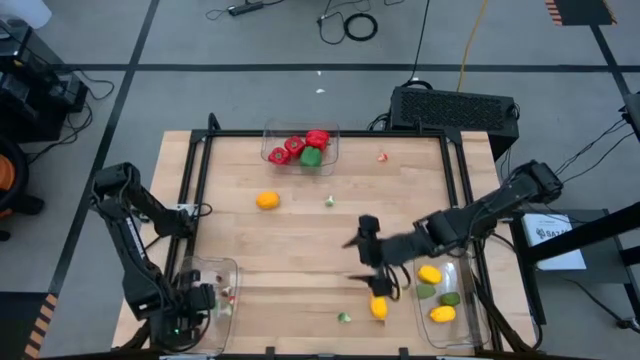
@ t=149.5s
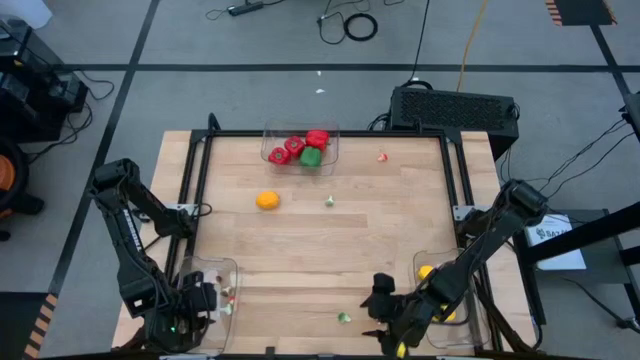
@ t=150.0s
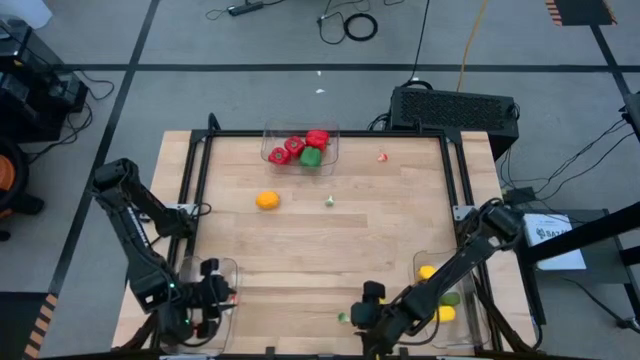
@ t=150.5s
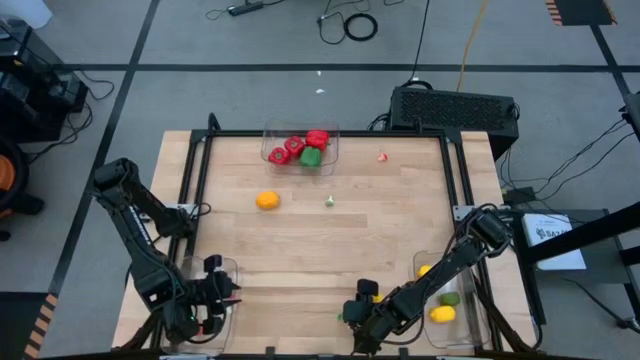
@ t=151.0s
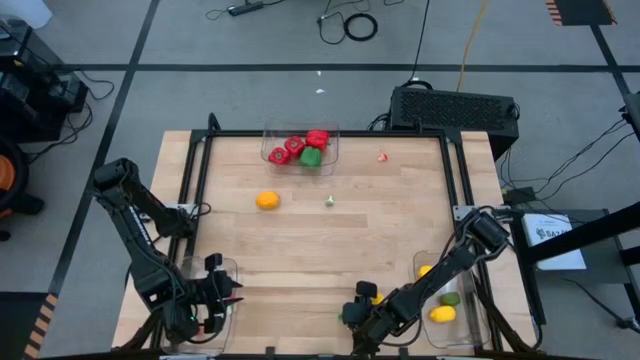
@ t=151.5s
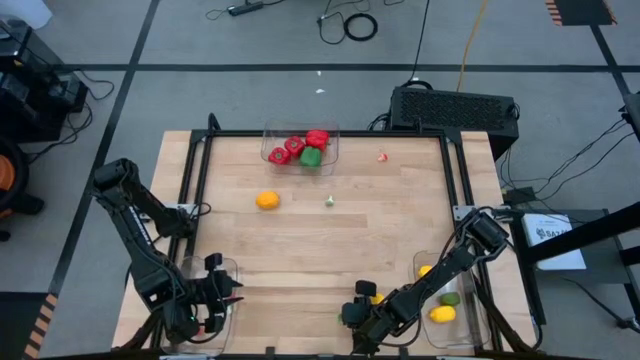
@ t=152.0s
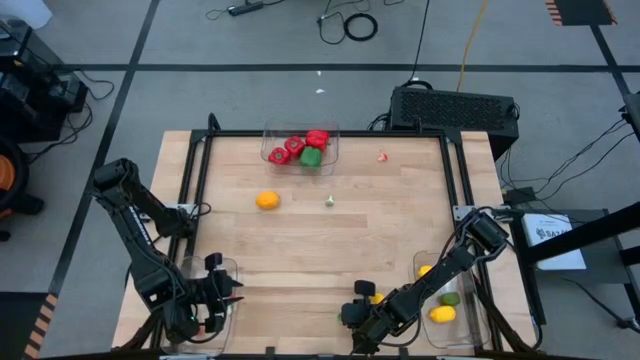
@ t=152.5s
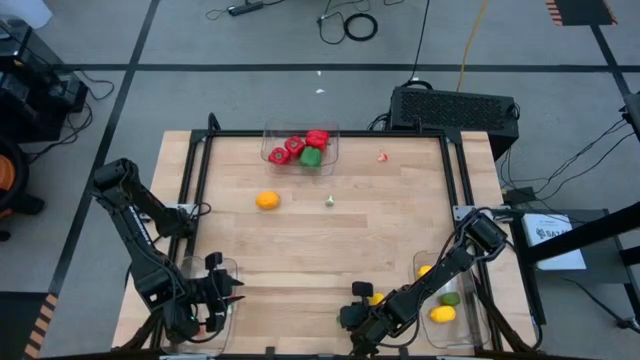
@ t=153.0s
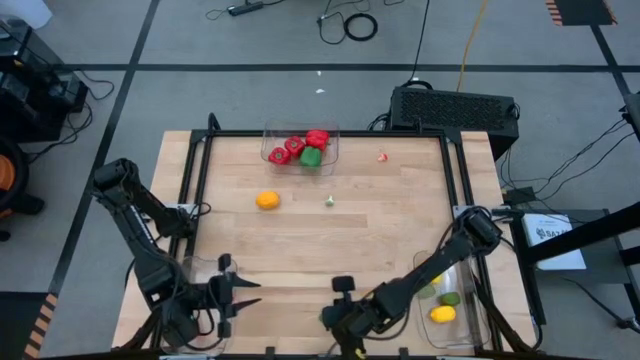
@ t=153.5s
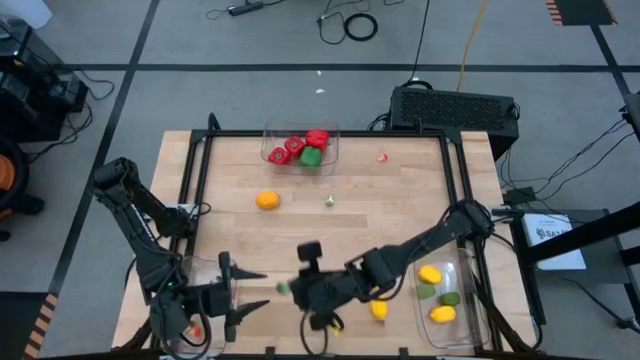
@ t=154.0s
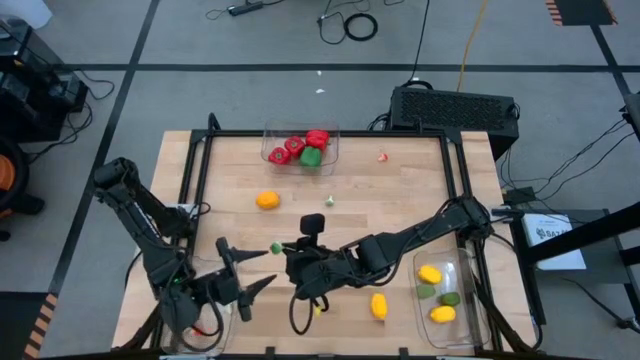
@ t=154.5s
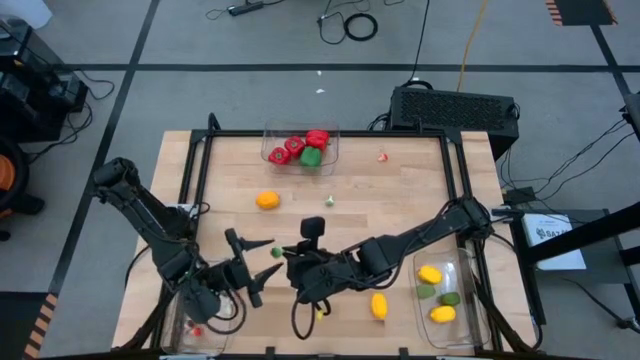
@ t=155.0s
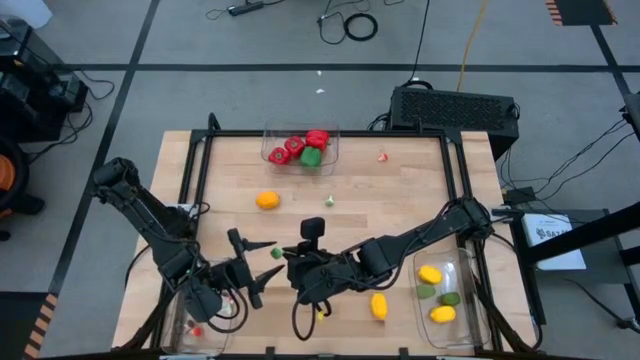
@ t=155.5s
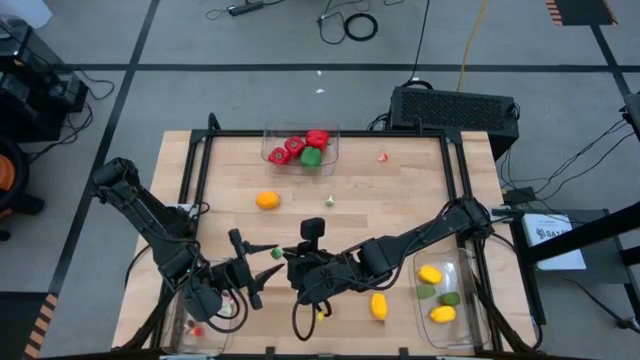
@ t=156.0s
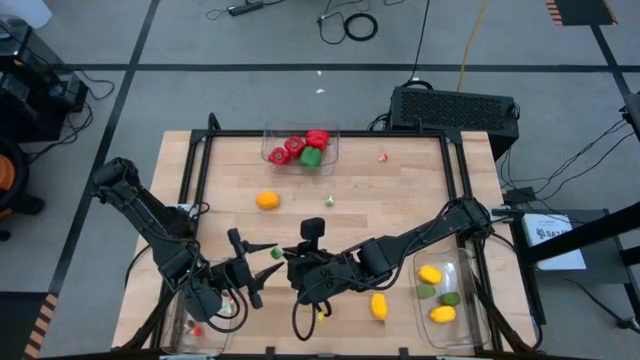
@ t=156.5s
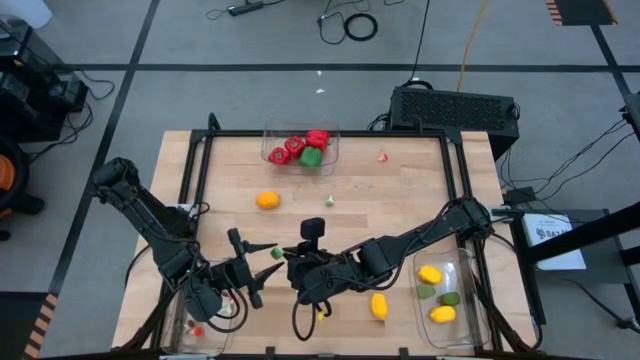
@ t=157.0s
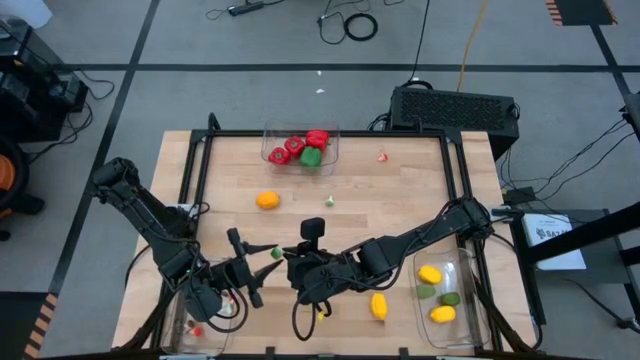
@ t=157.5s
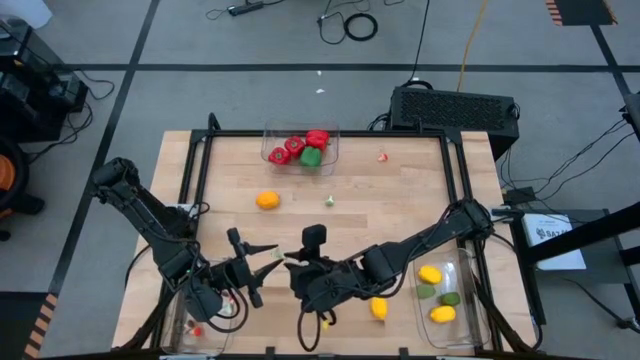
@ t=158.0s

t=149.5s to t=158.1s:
Task: Sort produce into baskets
Put the green mushroom into the bottom left transparent bin

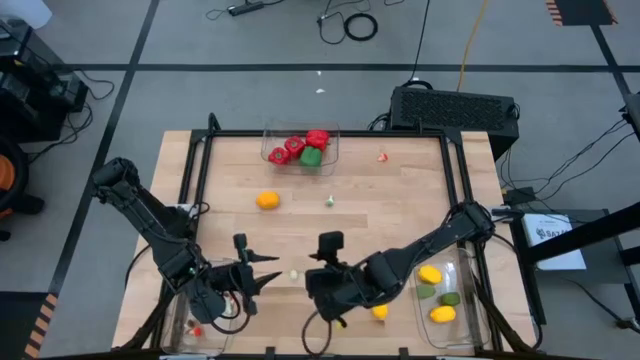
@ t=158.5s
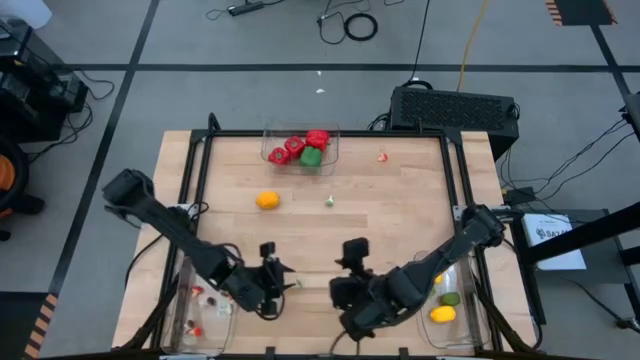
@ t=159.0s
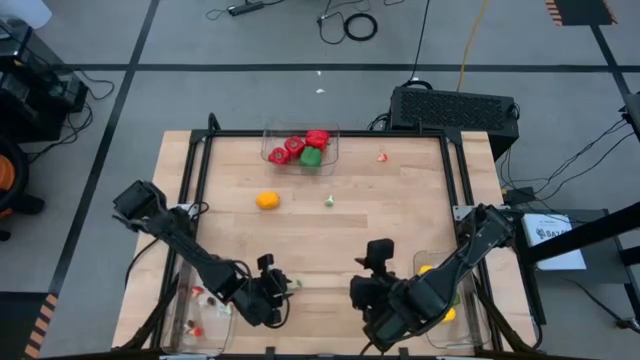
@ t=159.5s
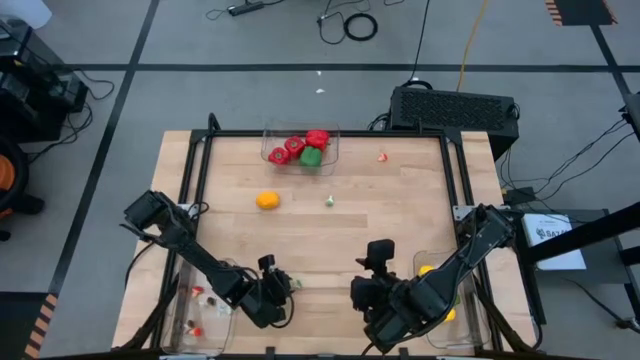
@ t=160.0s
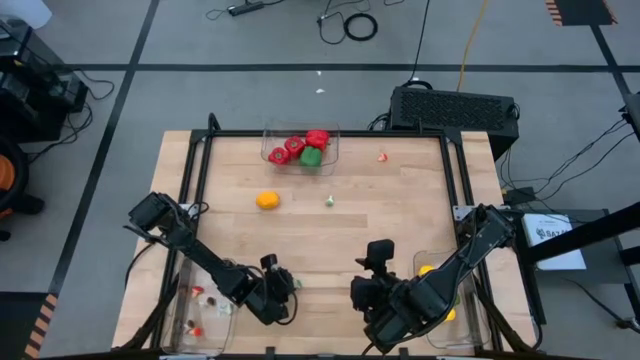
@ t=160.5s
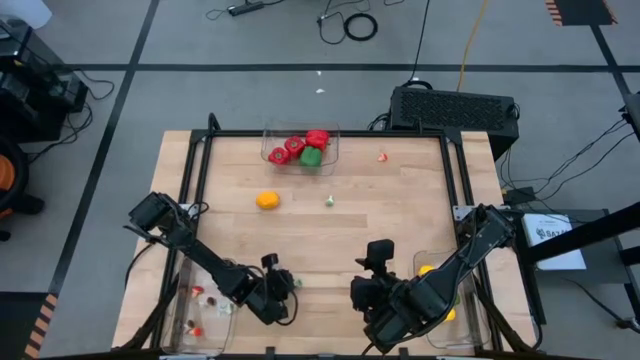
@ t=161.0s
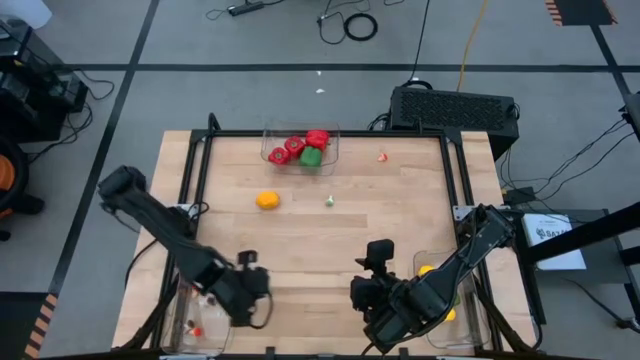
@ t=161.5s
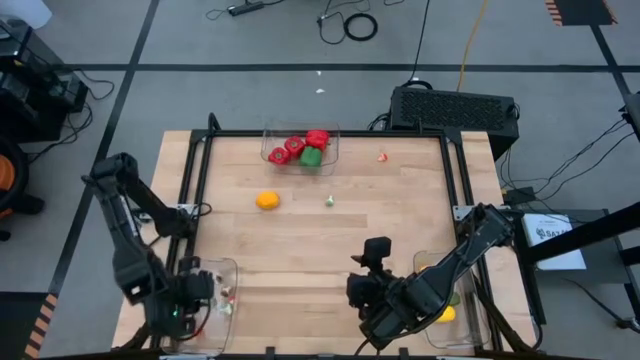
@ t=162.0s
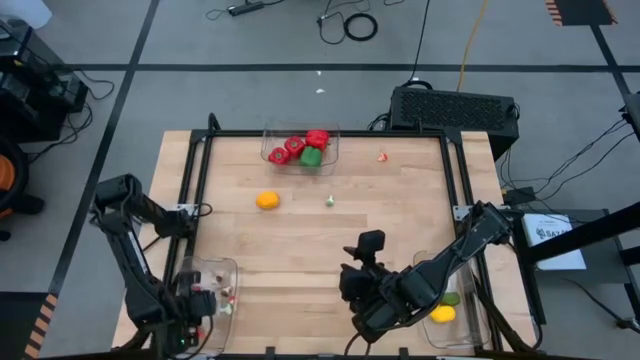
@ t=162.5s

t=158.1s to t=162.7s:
Put the green mushroom into the bottom left transparent bin

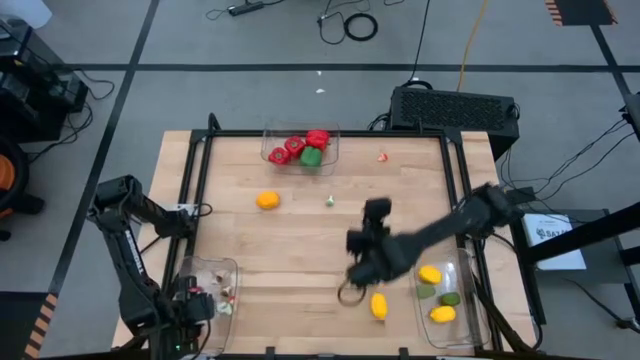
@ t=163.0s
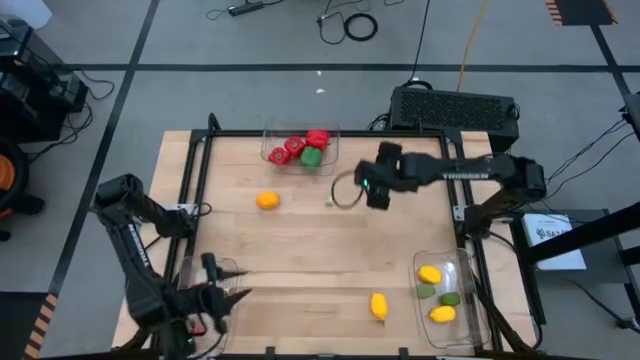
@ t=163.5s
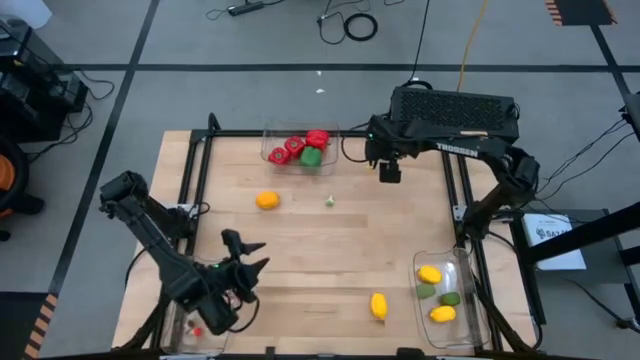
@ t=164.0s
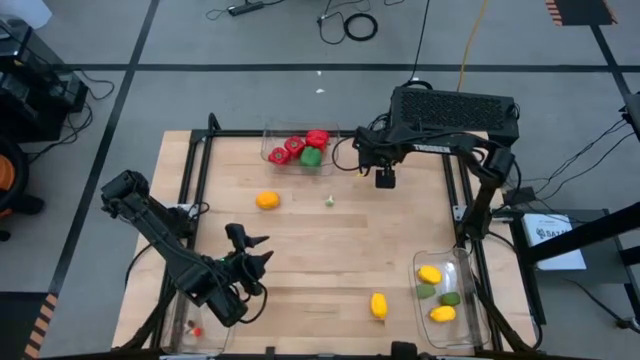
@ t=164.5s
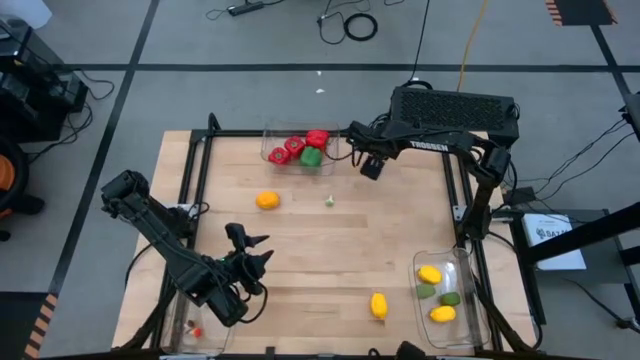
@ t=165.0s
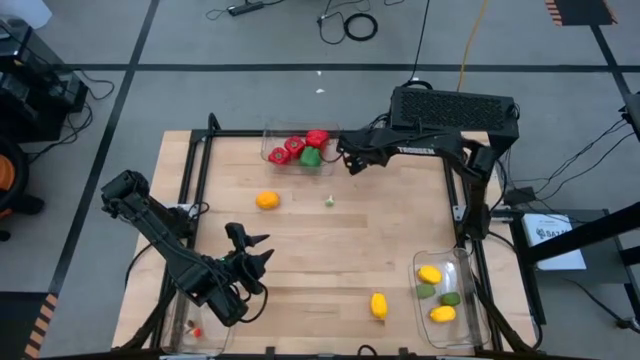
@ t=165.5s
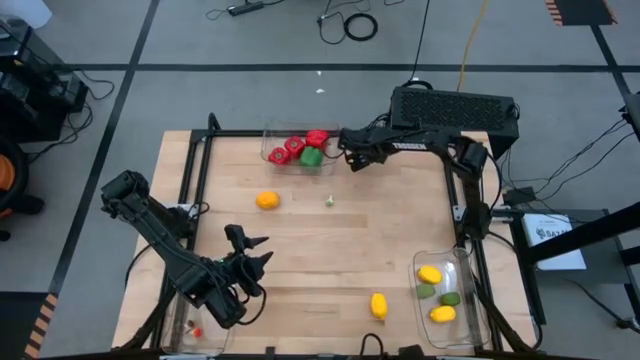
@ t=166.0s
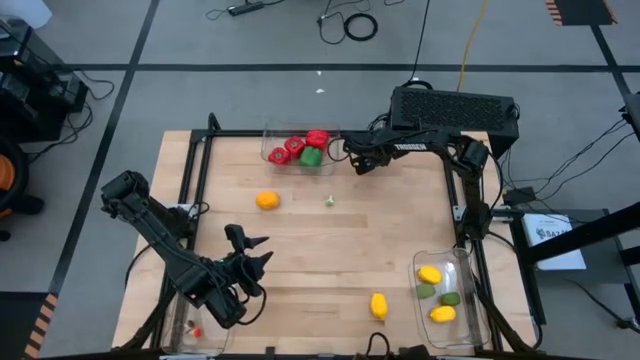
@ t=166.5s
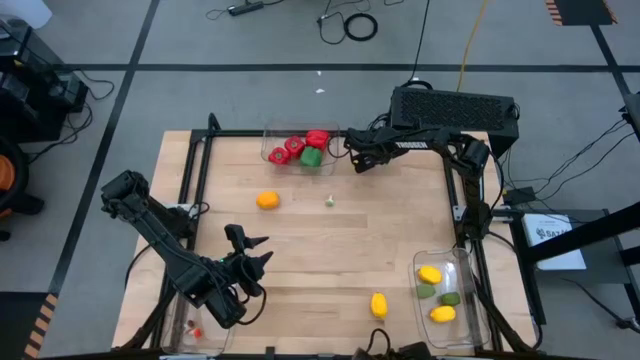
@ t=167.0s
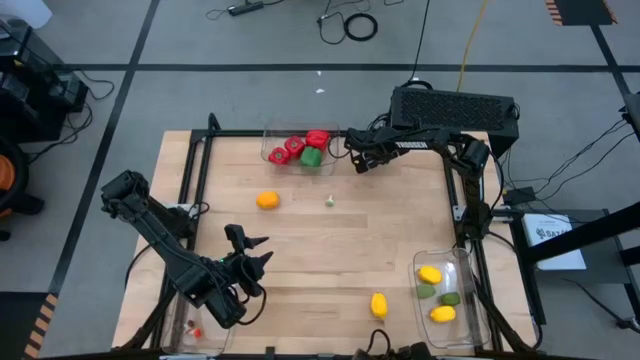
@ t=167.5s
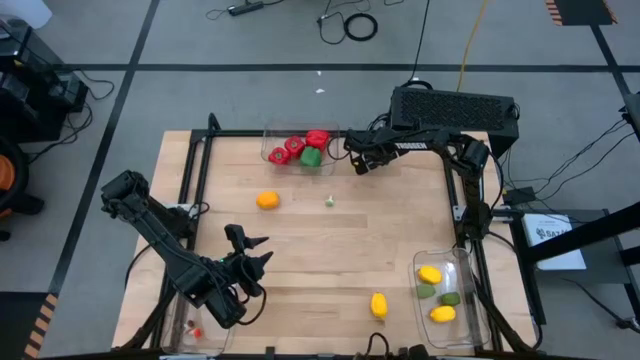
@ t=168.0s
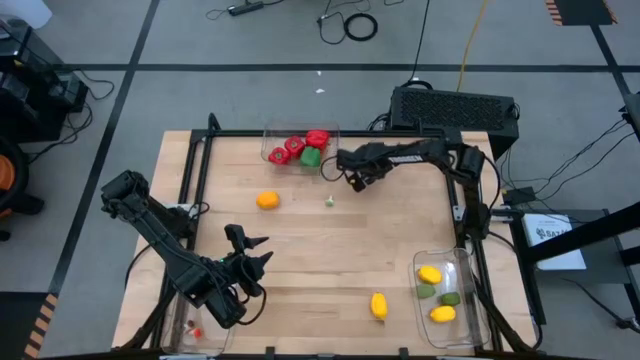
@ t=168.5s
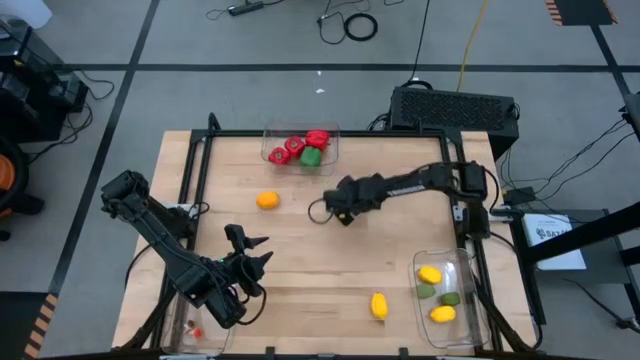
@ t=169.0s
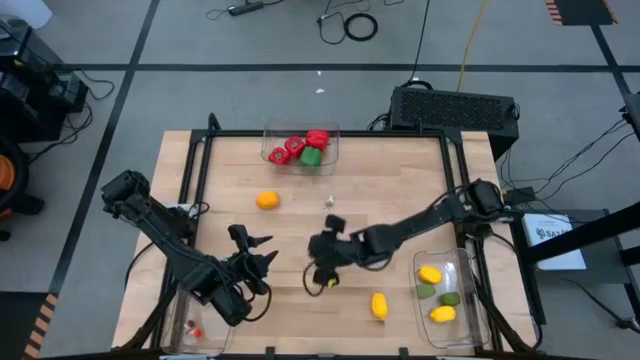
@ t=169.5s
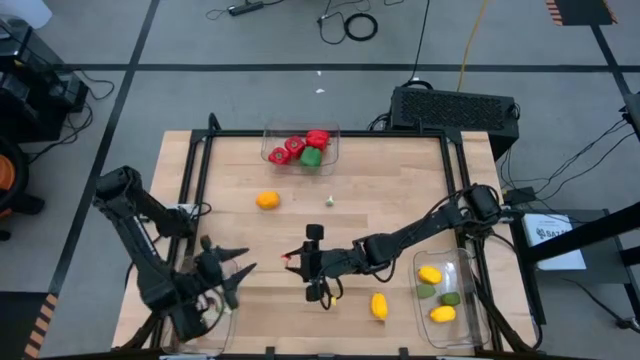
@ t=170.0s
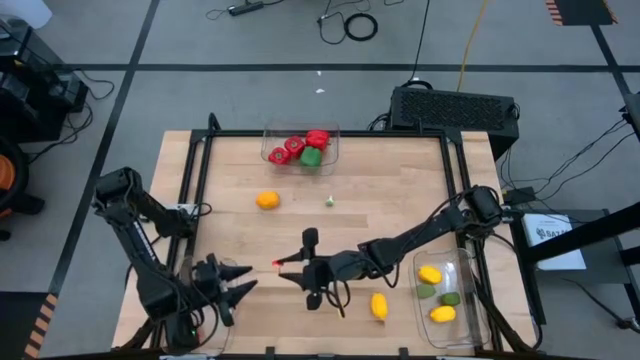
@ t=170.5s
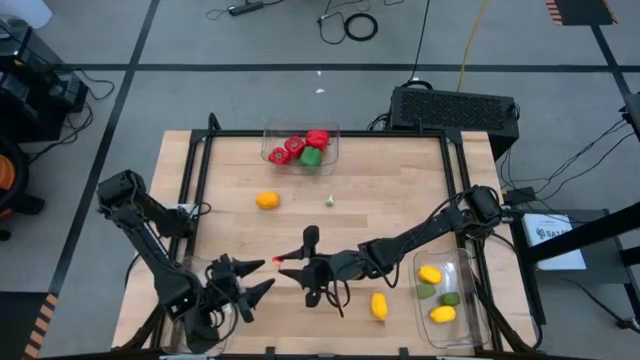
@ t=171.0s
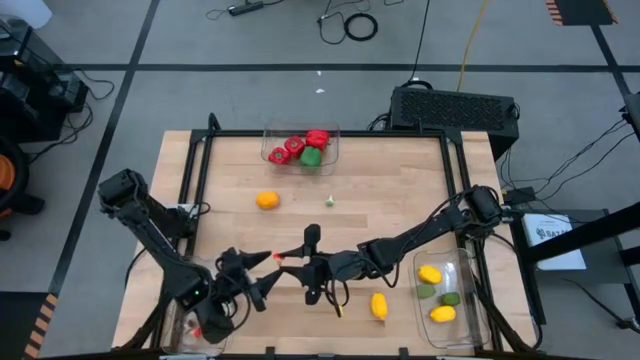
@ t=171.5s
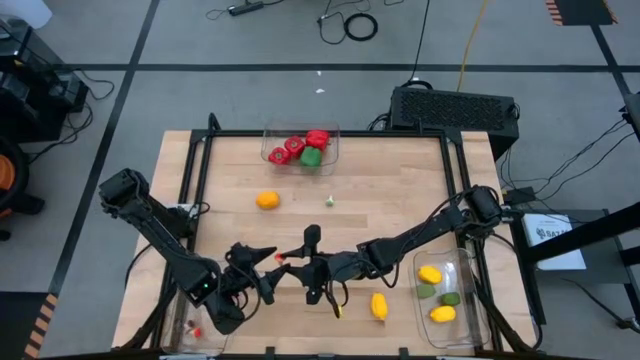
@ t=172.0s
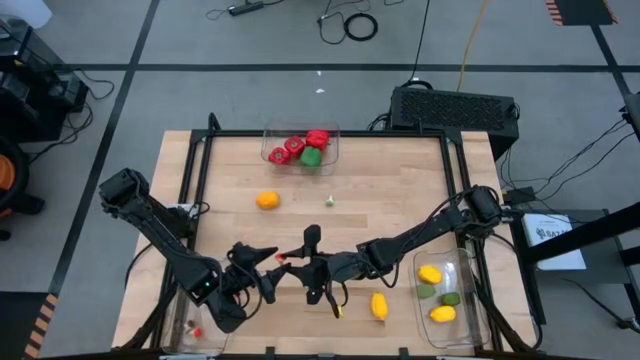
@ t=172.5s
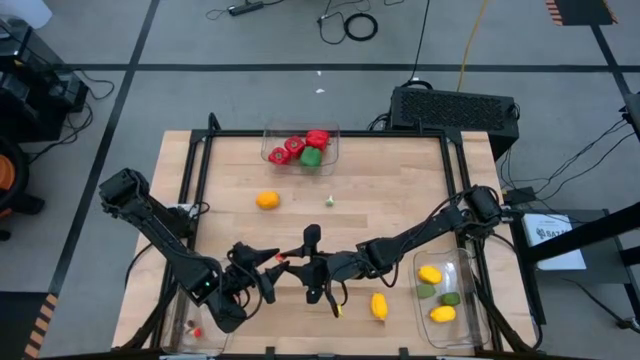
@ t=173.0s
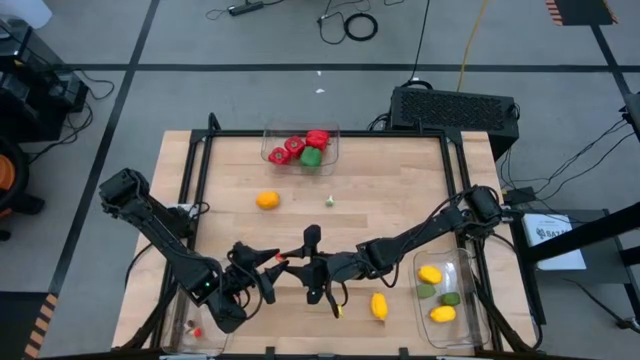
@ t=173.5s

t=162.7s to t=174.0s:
Put the red mushroom into the bottom left transparent bin
